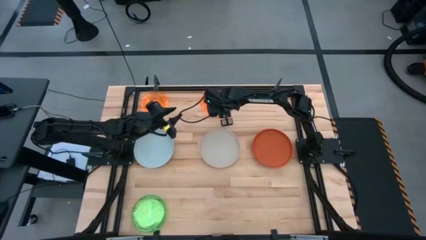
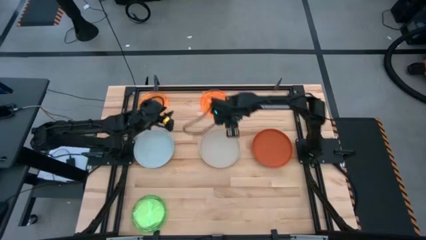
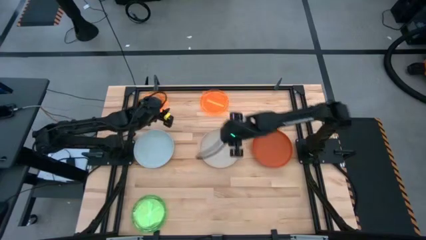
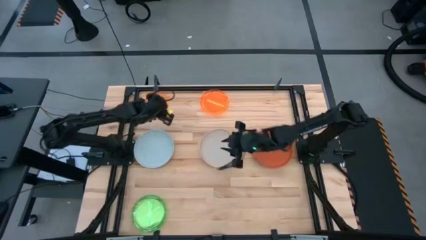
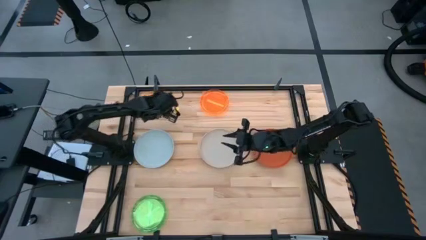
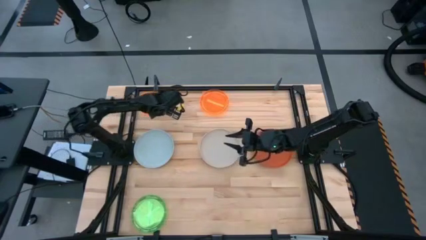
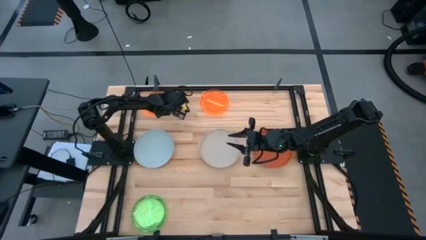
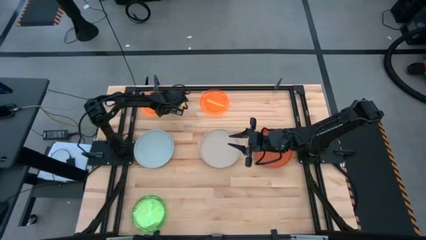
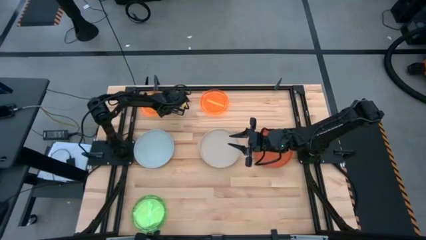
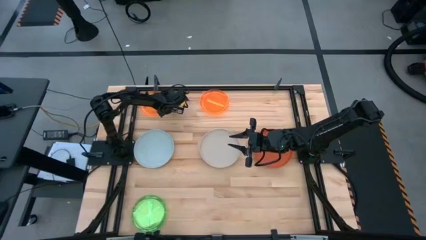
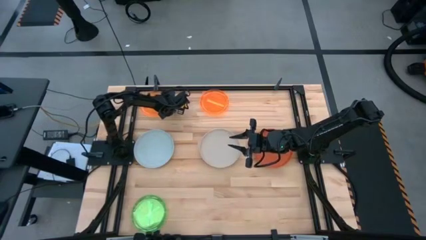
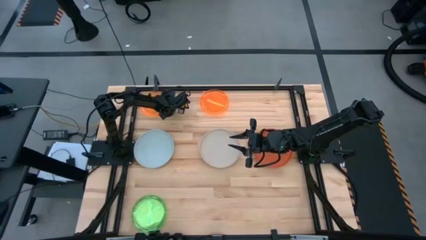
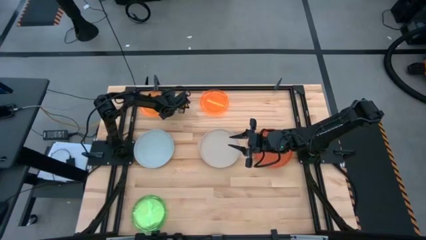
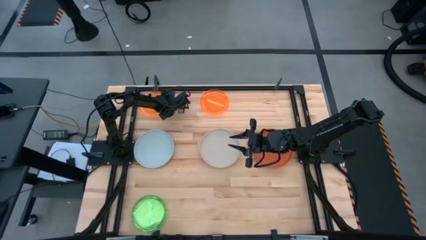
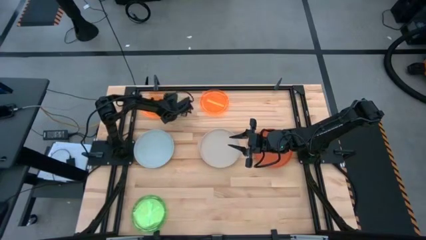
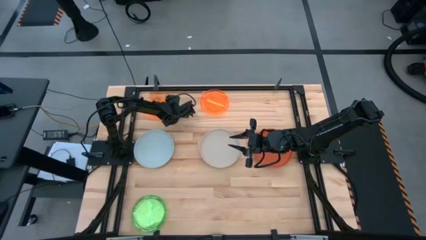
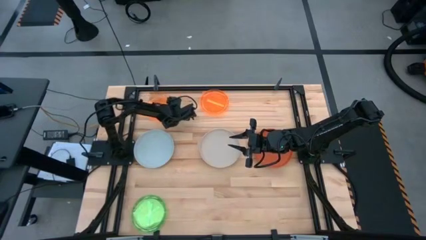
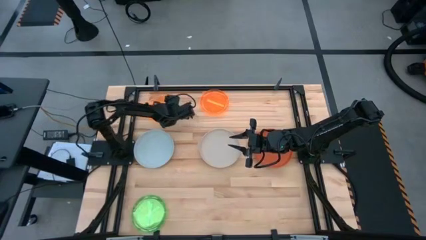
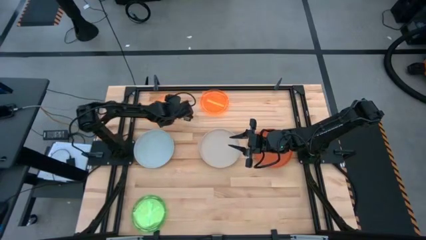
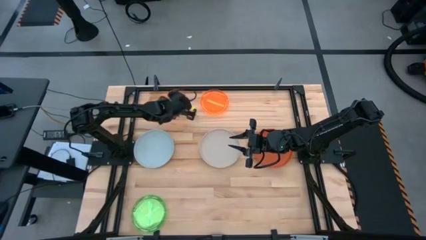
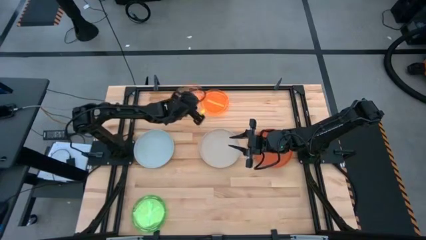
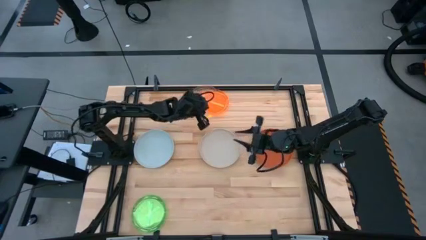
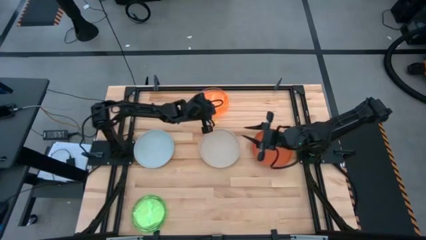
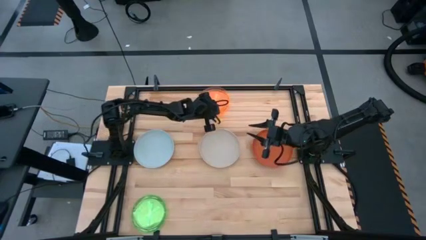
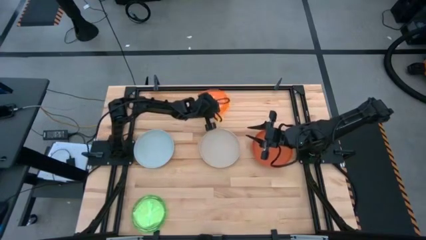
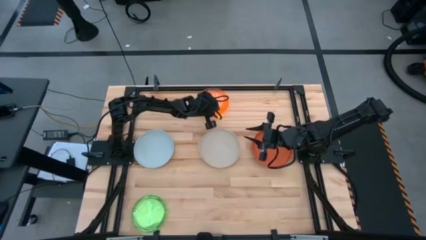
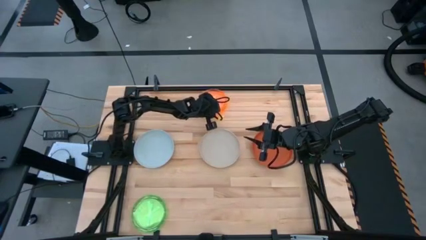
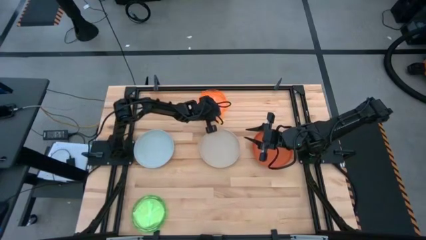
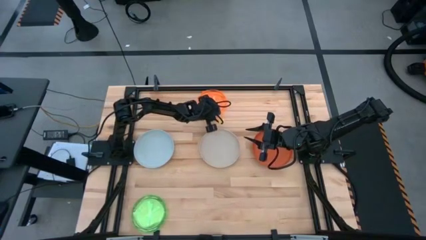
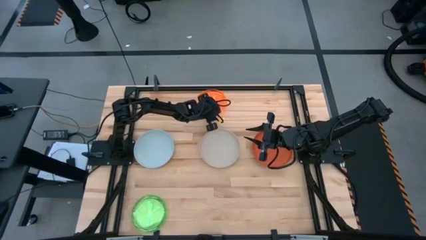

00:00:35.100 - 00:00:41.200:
Task: Stack plastic plates
Stack the left light orange plate on top of the right light orange plate

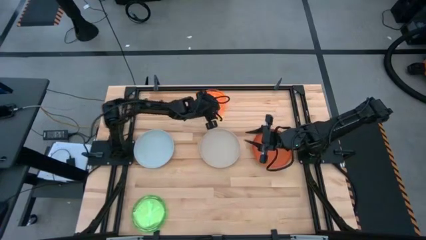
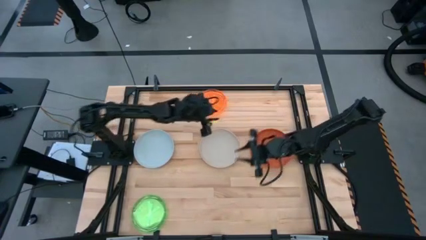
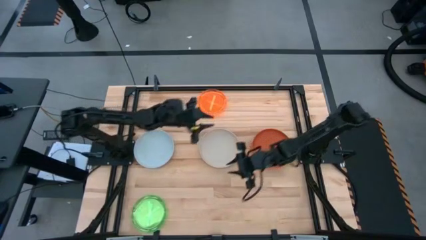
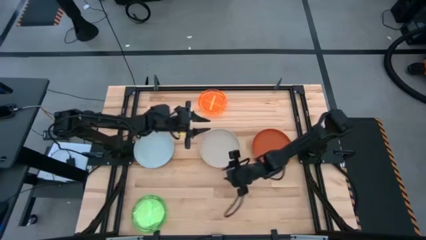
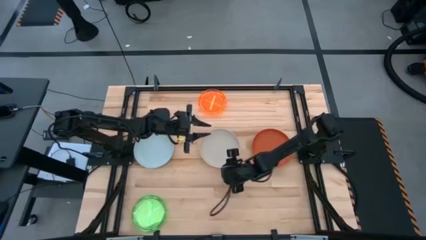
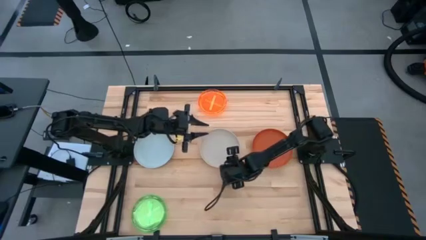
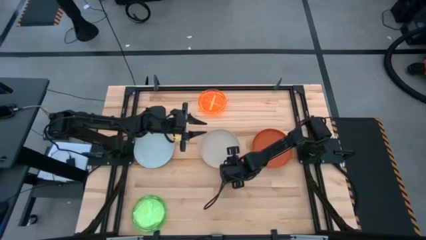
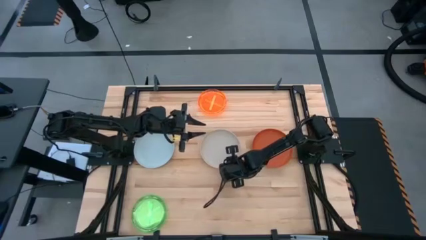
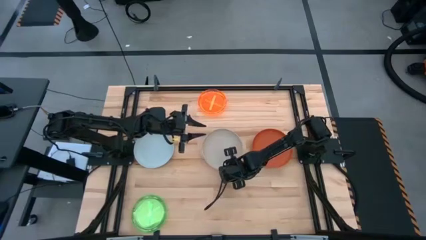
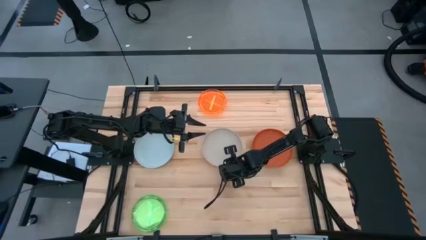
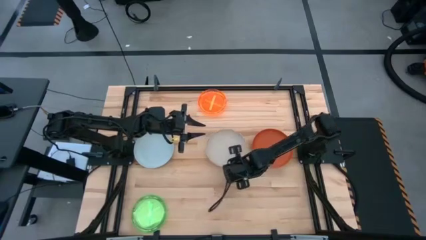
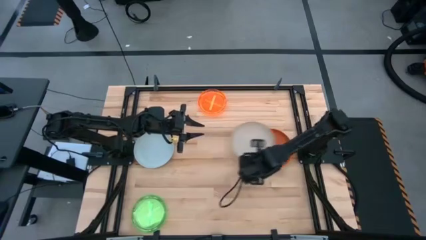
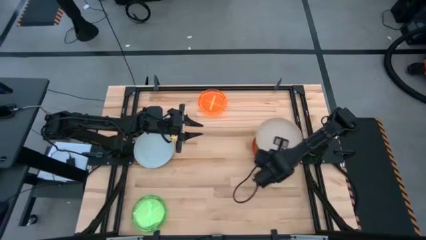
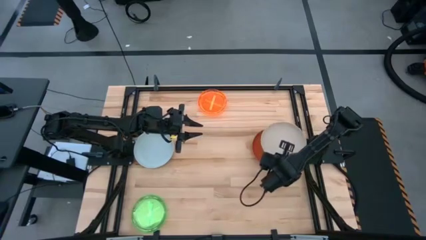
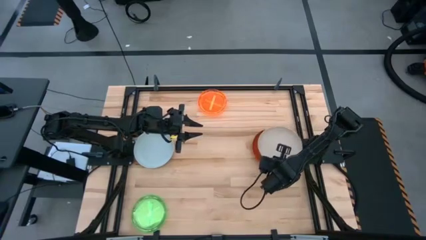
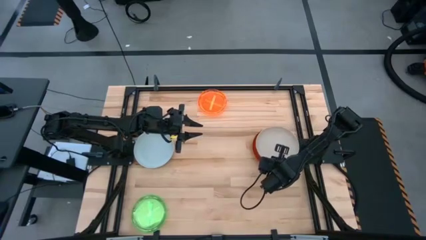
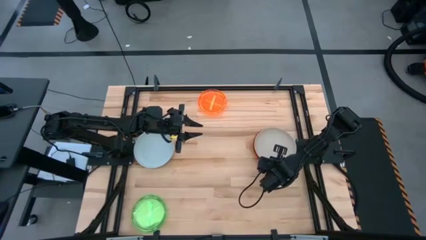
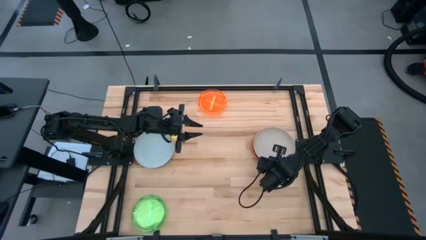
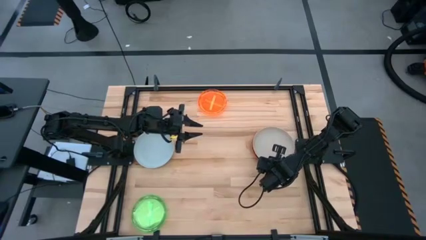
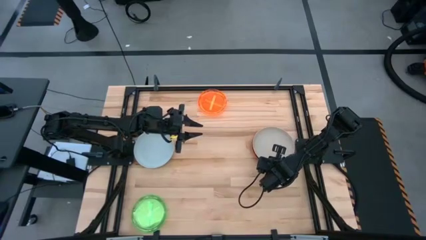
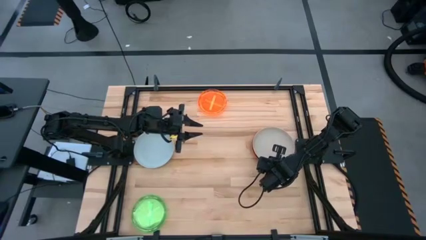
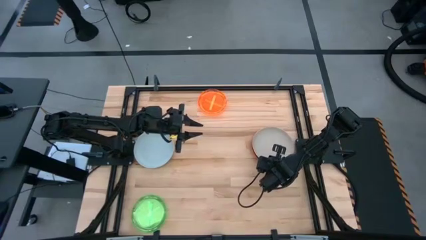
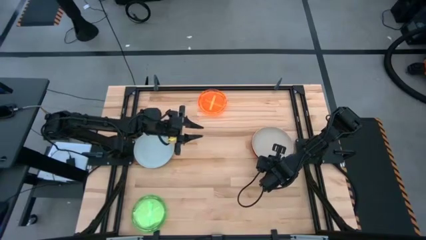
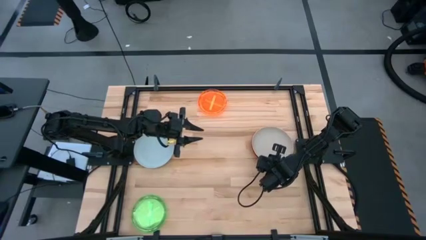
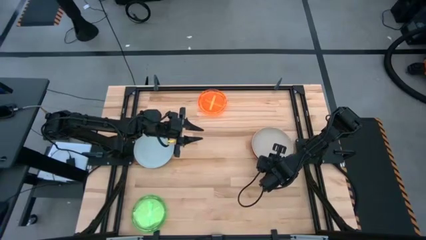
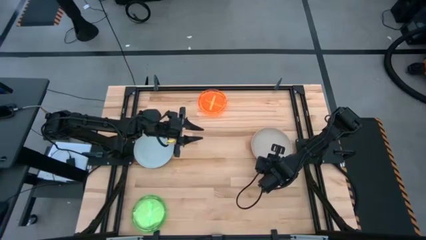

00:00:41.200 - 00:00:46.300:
Stack the light brown plate on top of the dark orange plate

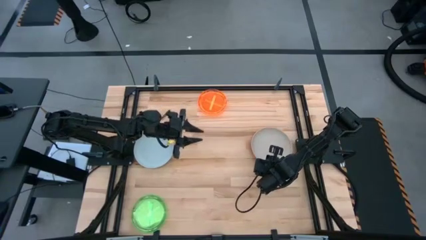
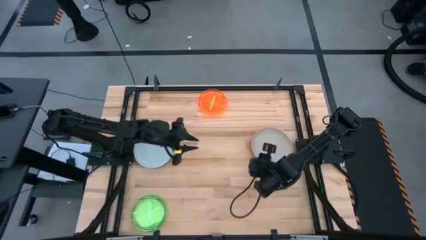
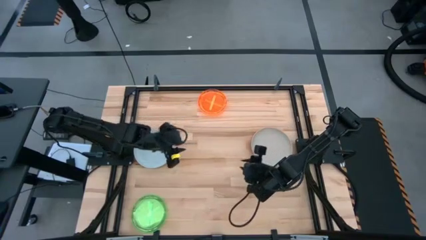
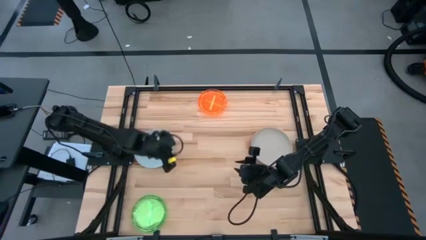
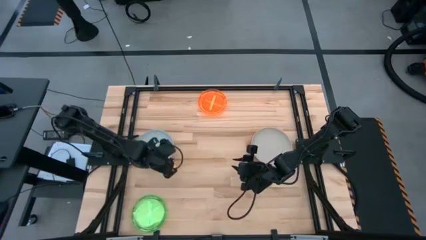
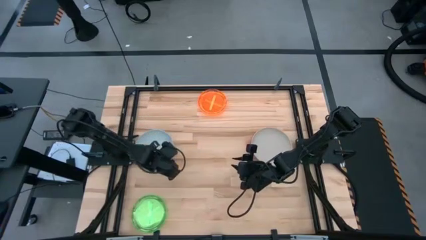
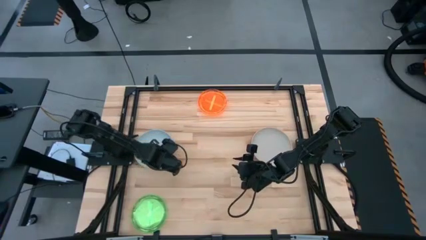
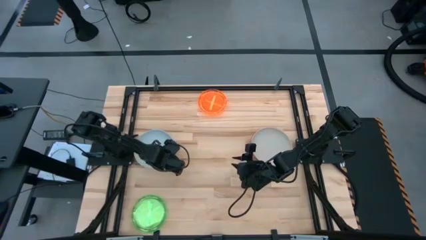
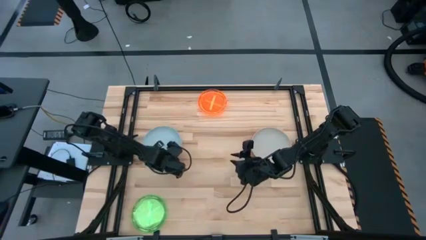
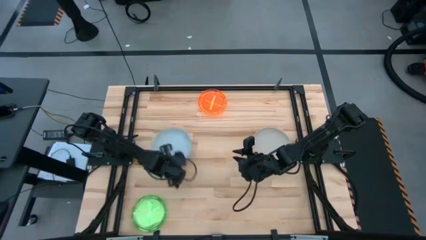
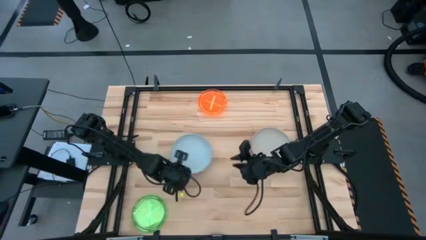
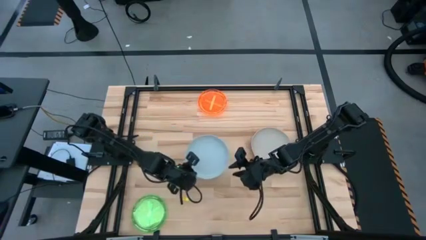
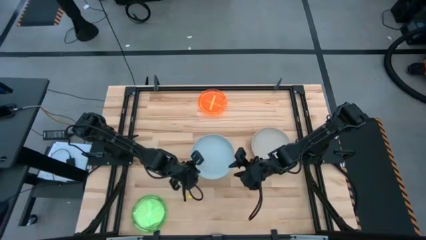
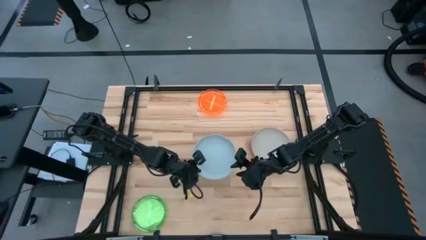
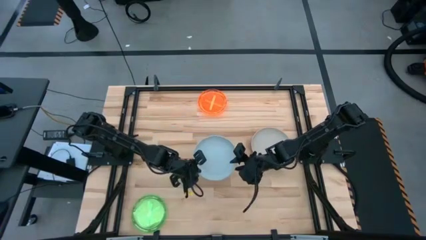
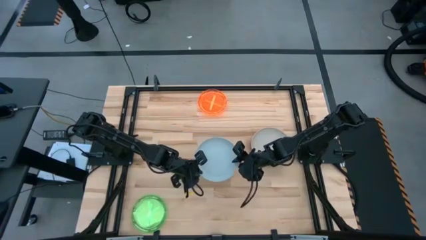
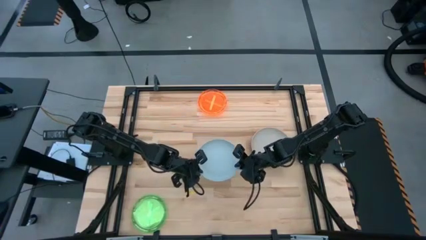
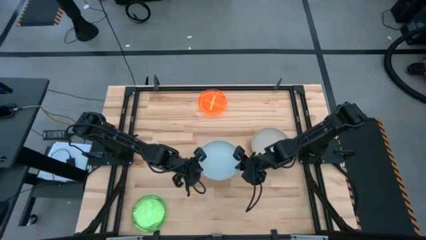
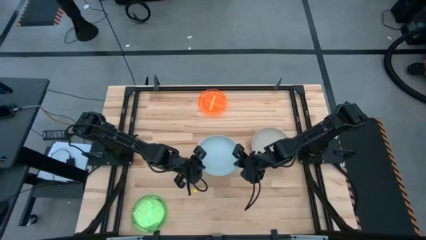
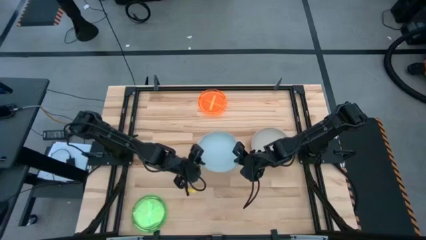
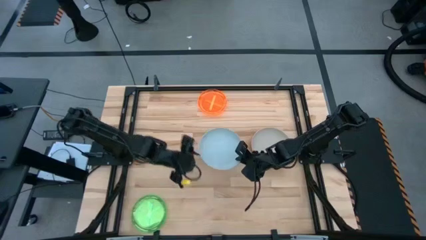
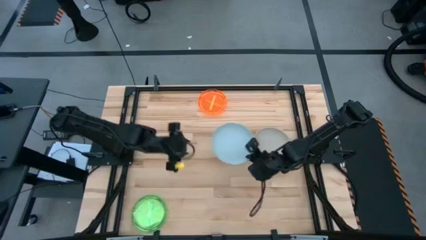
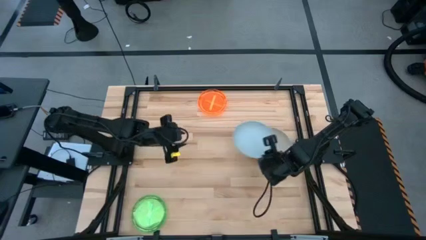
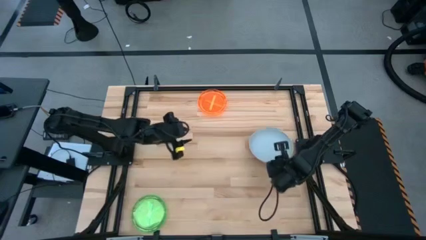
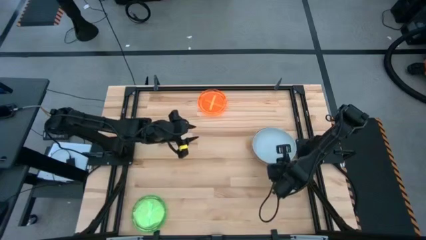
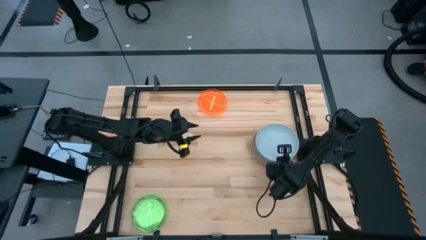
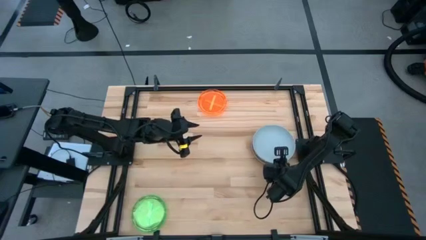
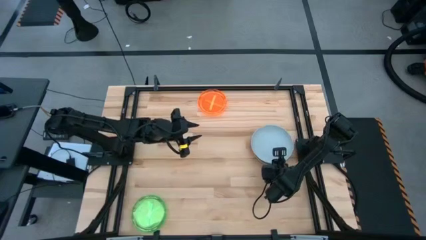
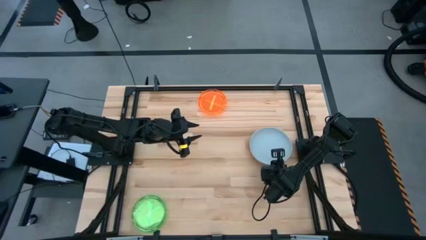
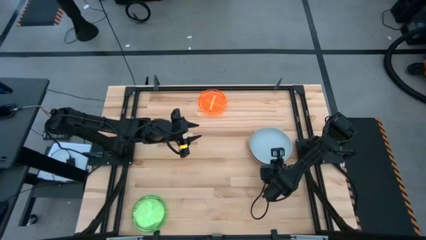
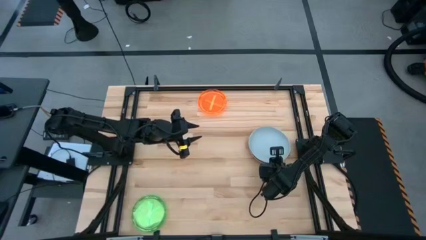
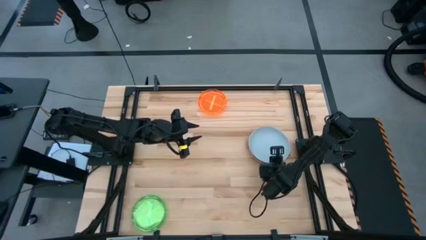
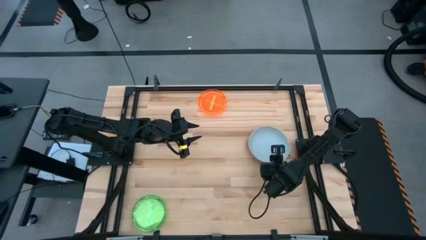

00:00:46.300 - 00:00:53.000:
Stack the gray plate on top of the light brown plate
